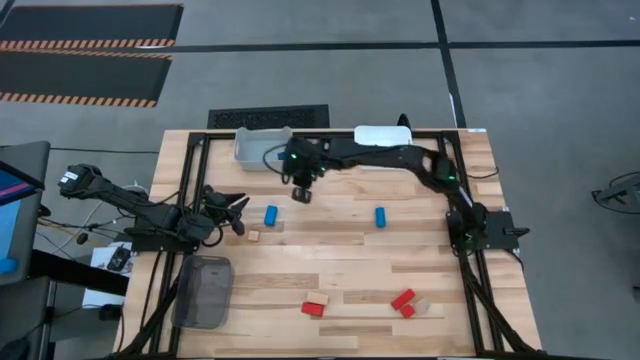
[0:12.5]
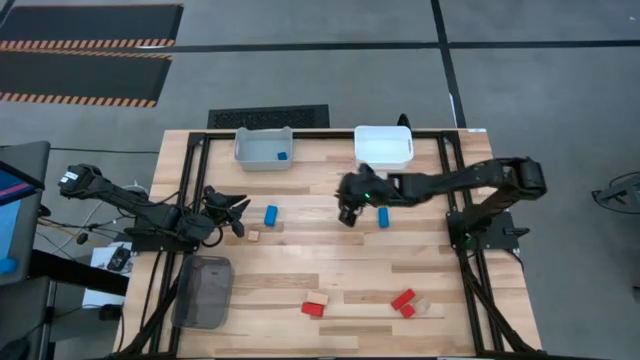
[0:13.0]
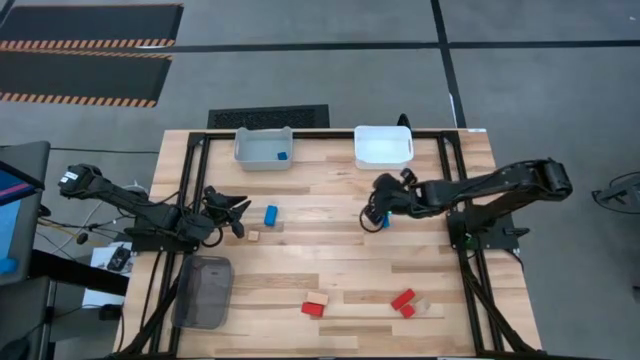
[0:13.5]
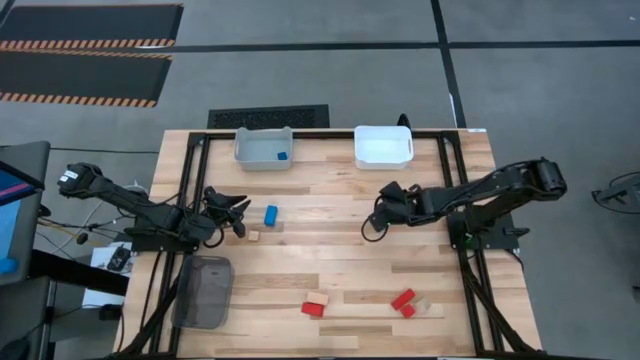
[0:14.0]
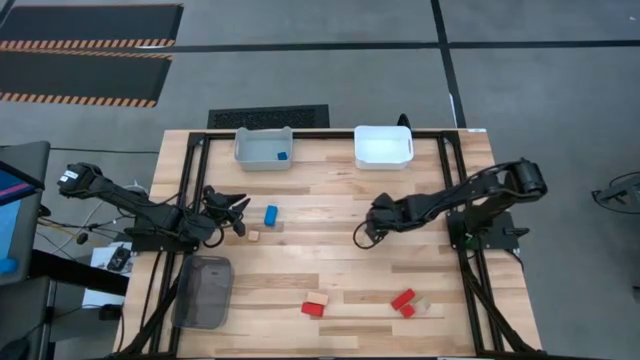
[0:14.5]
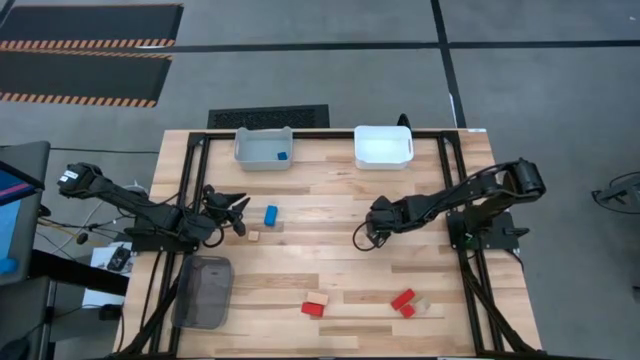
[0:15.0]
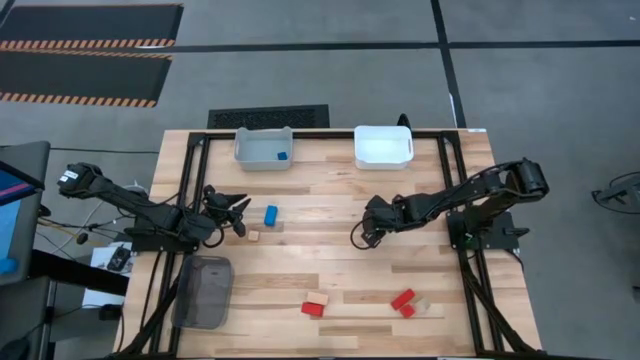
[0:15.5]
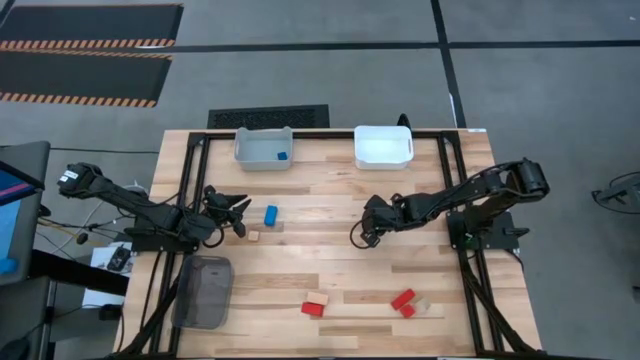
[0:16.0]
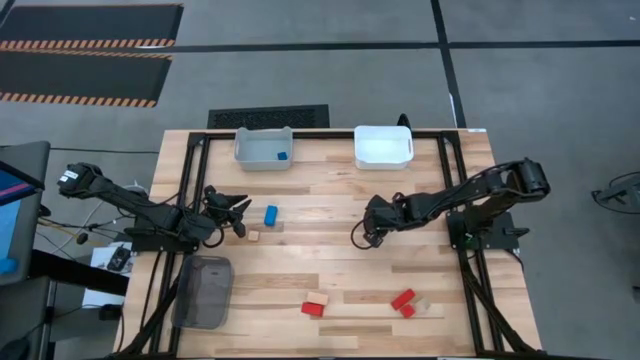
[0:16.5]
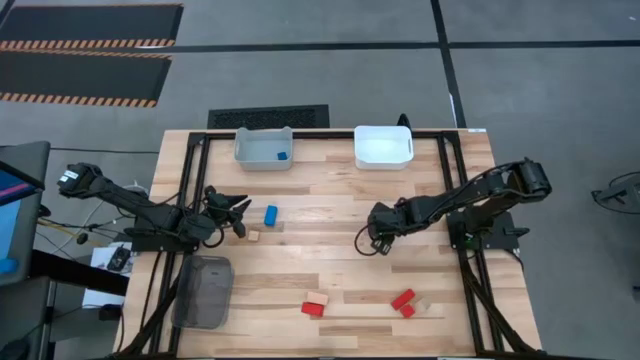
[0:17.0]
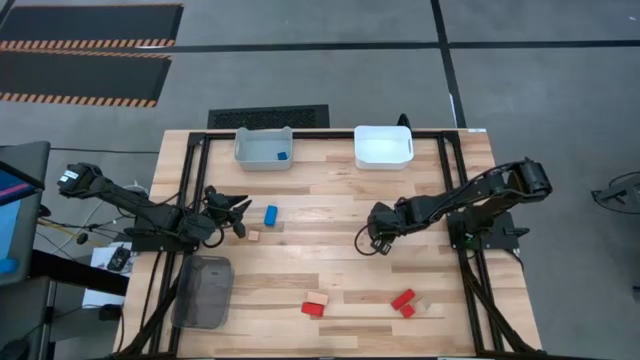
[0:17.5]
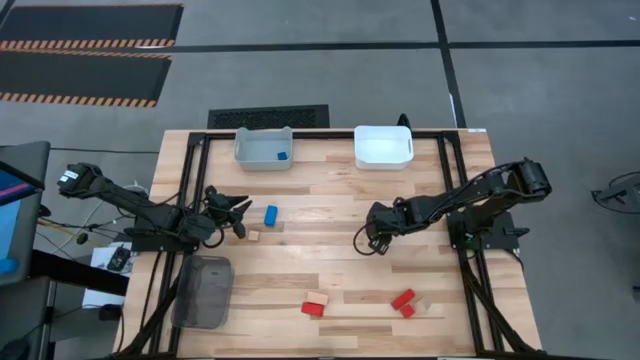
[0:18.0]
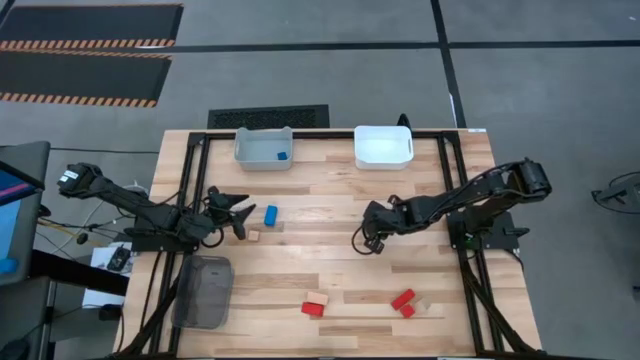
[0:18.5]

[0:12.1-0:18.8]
Task: Sort & place blocks by color
Put the blue cylinder block into the gray bin

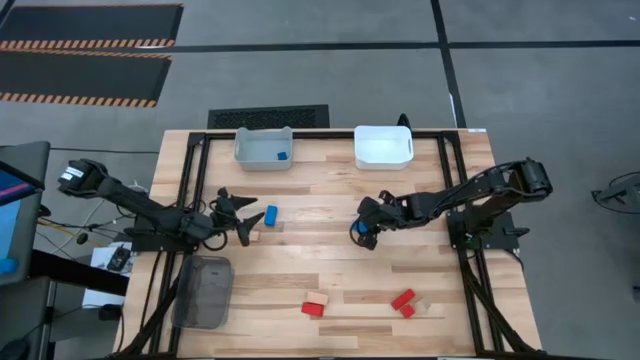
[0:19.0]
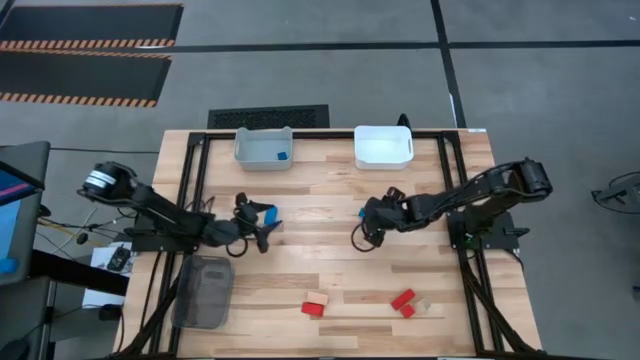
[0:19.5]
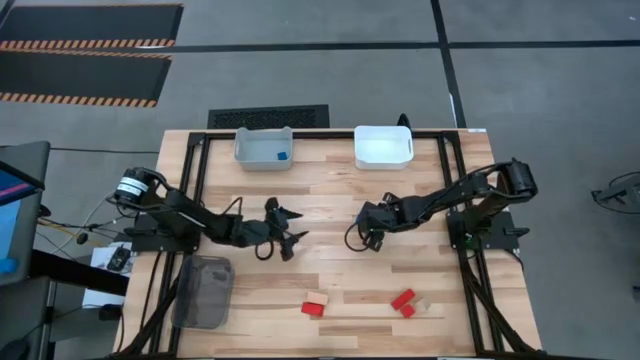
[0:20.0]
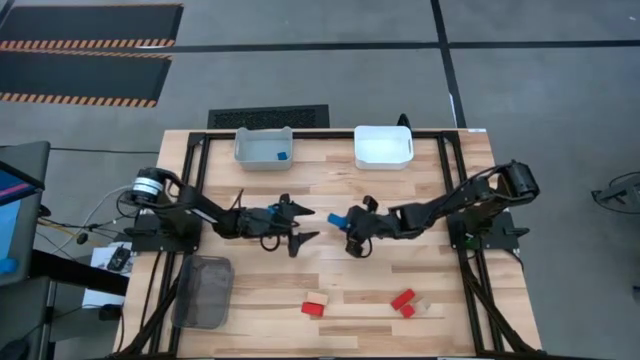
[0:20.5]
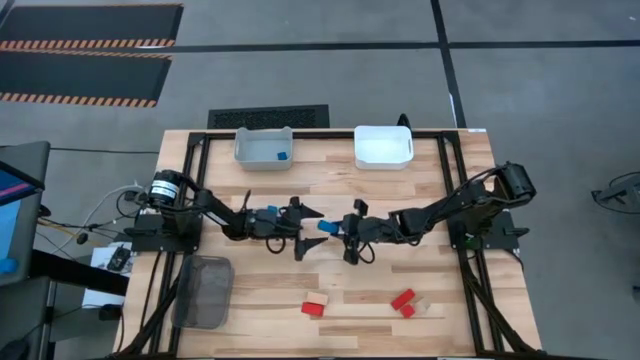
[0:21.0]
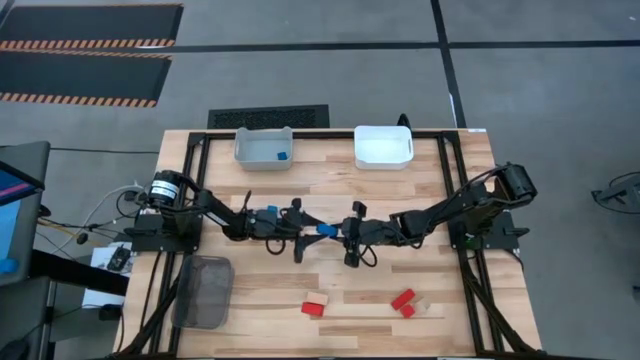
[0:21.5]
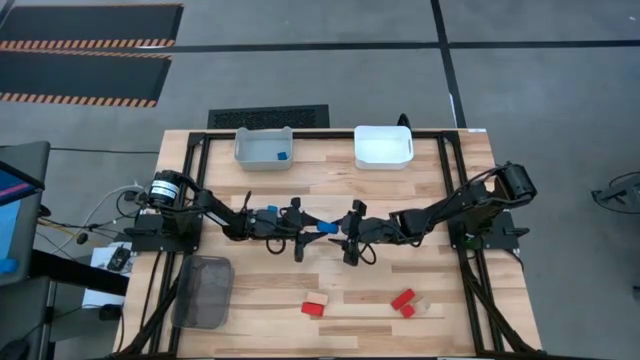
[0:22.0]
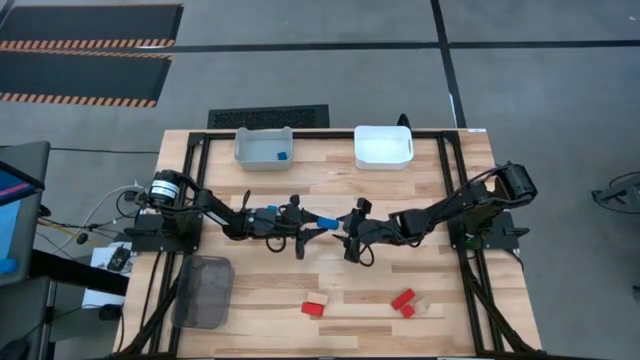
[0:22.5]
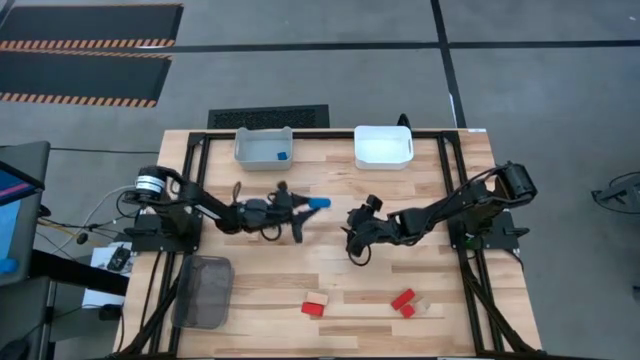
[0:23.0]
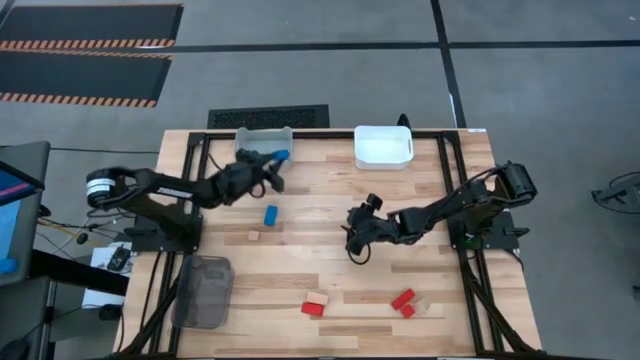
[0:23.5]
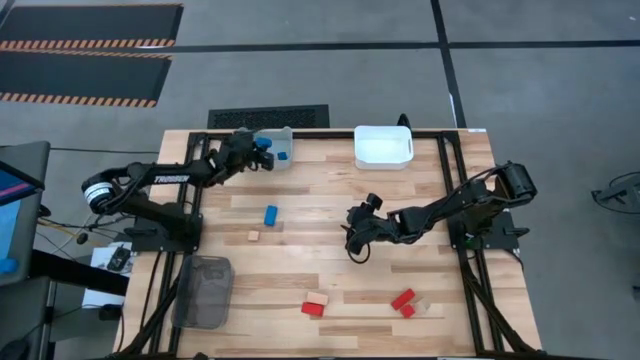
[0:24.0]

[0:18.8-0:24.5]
Put the blue cylinder block into the gray bin

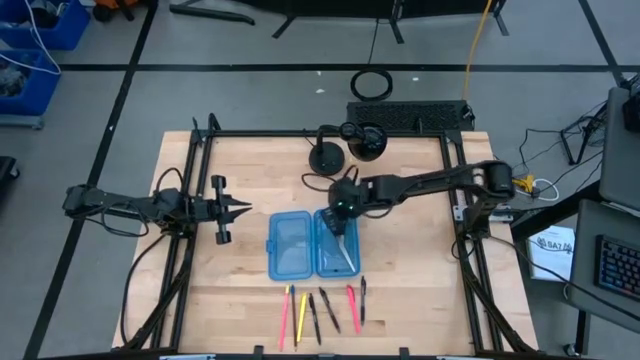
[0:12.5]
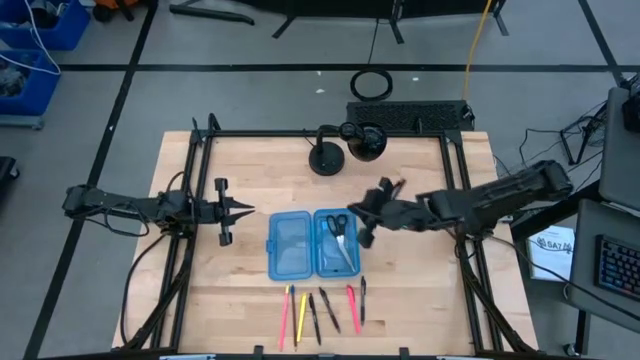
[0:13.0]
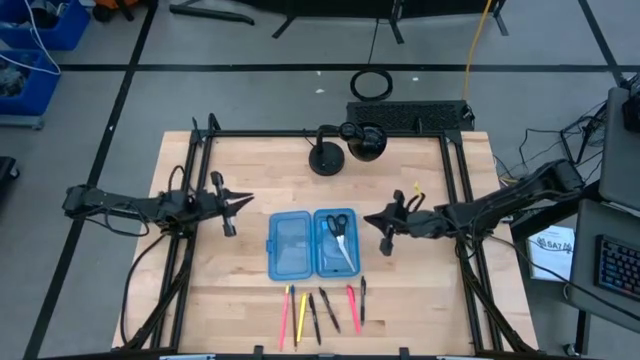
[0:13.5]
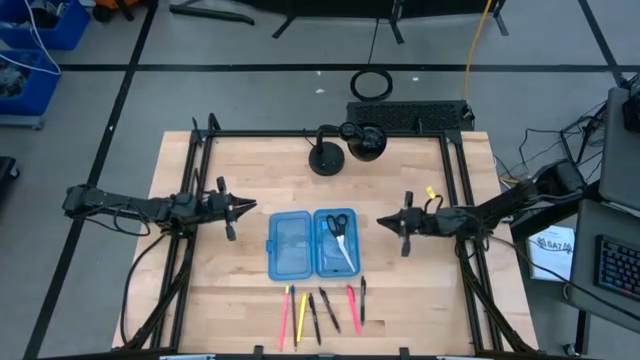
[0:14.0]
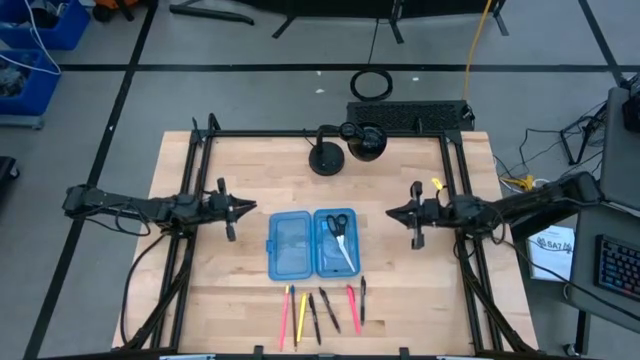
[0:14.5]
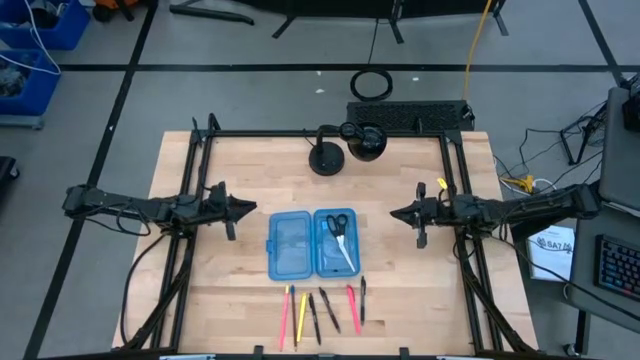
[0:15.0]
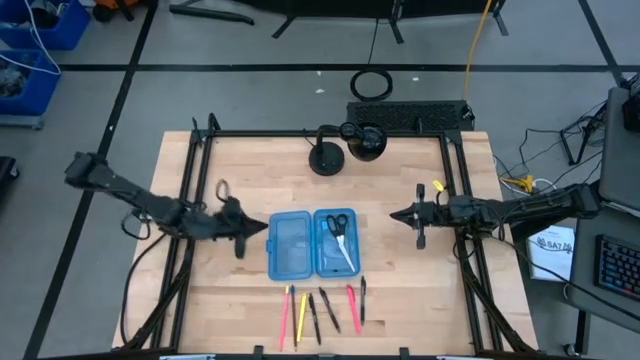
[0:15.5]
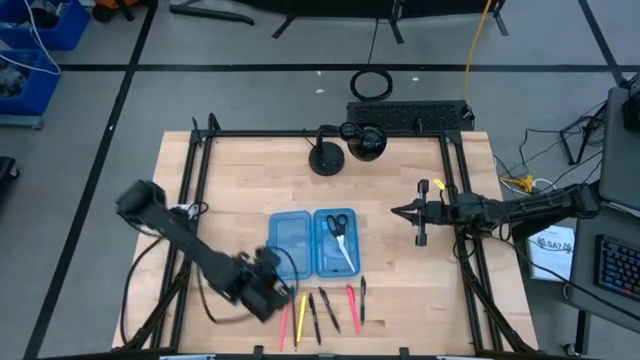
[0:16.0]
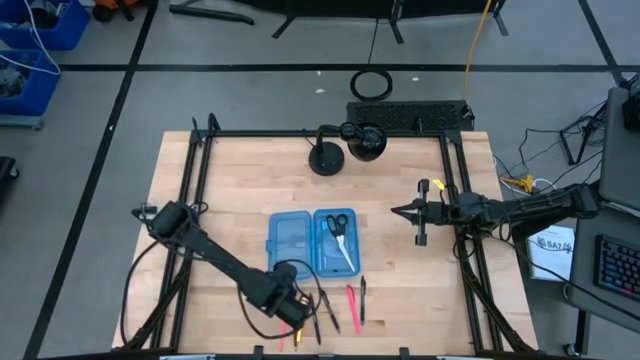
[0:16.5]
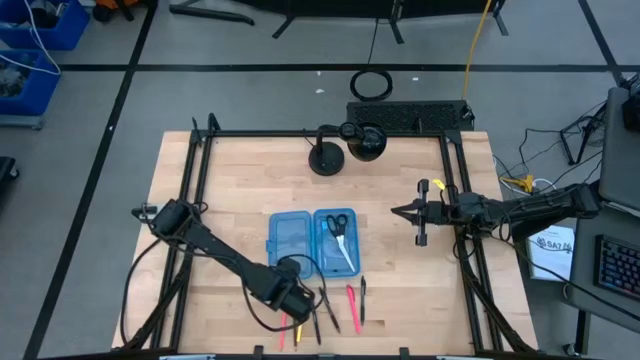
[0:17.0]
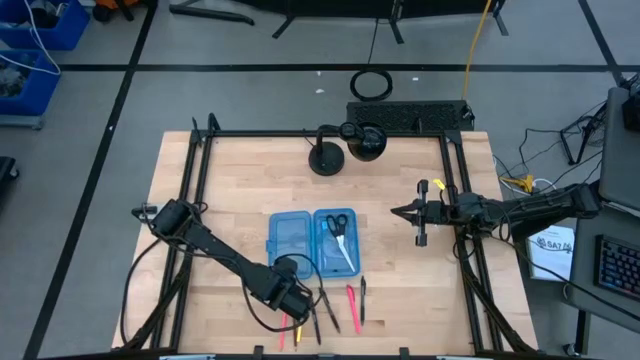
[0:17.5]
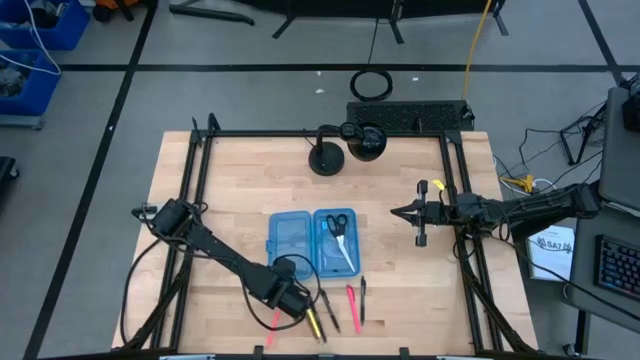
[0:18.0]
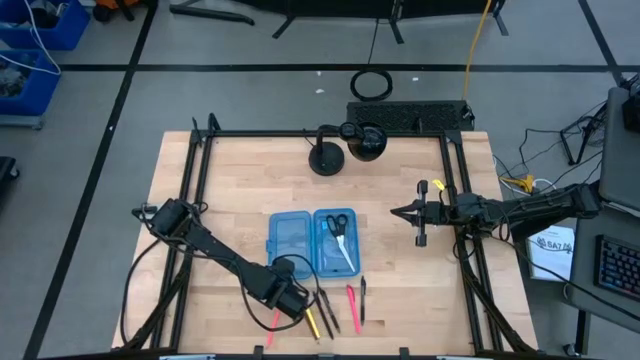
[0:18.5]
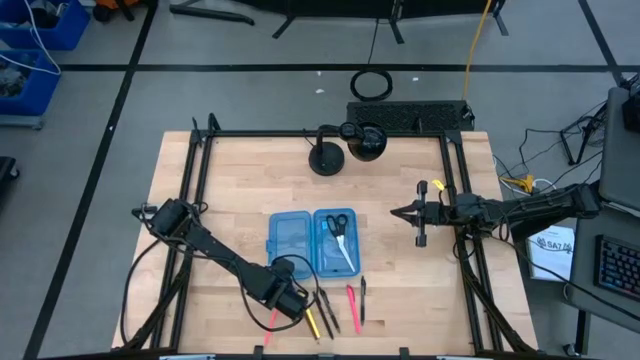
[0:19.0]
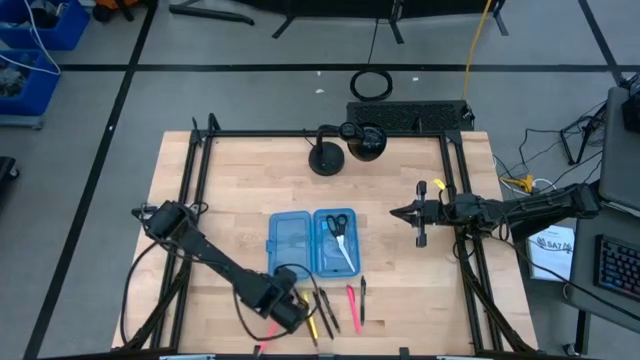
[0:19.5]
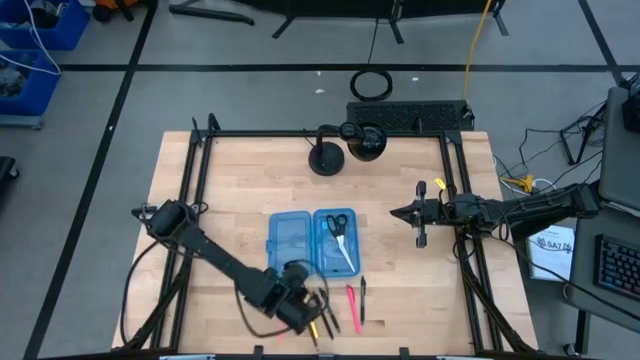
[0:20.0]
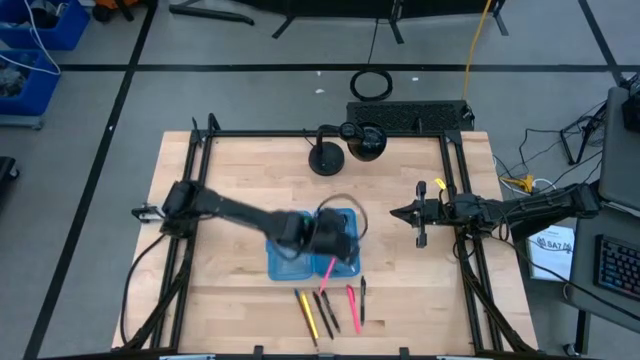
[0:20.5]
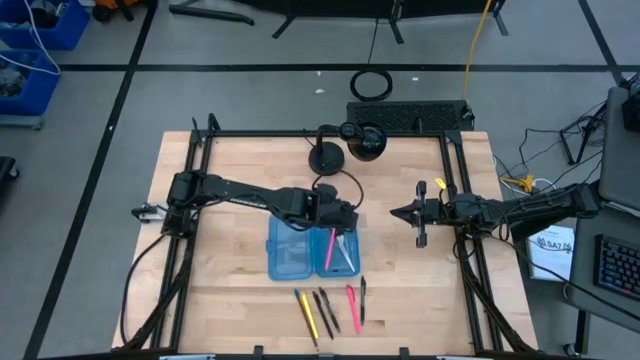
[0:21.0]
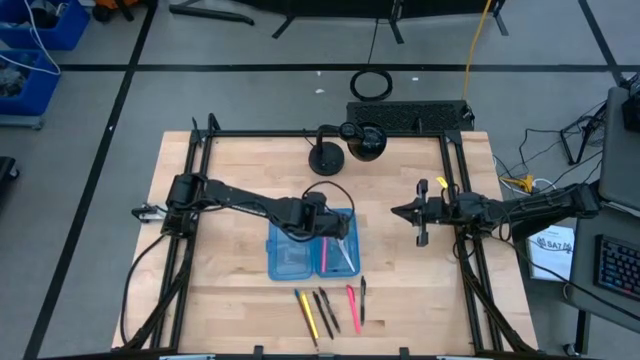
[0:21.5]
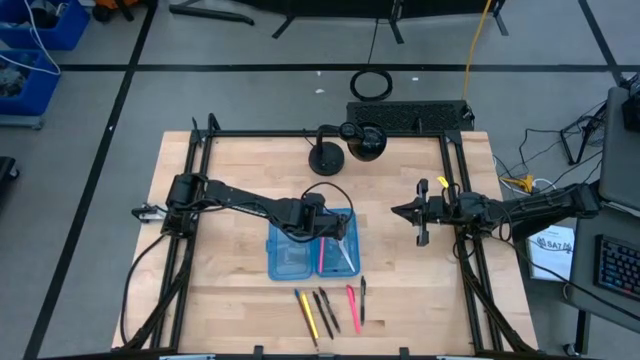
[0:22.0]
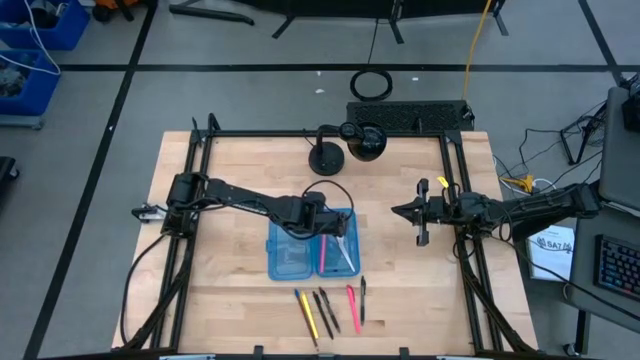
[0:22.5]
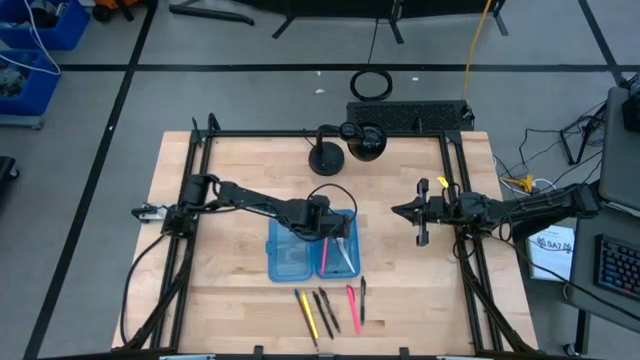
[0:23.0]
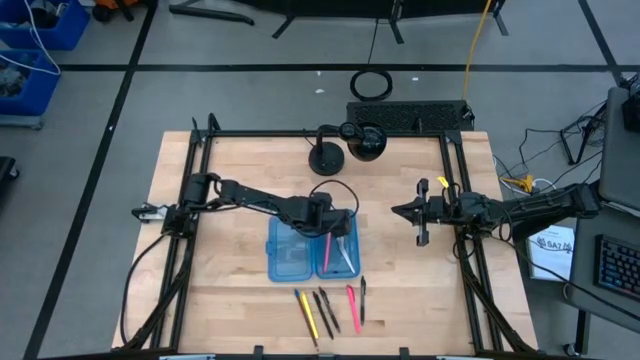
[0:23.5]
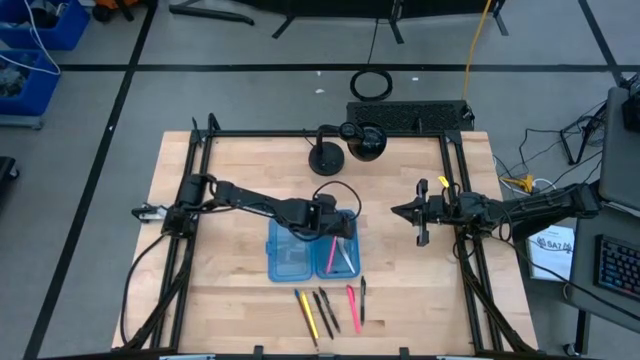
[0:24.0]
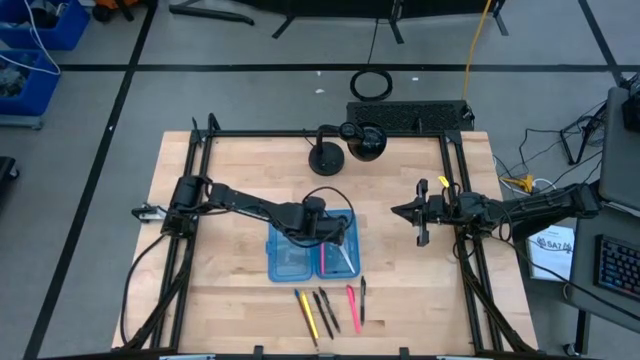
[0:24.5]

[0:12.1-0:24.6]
Task: Pick & place school supplies into a supply box
Put the pink pencil into the blue supply box
